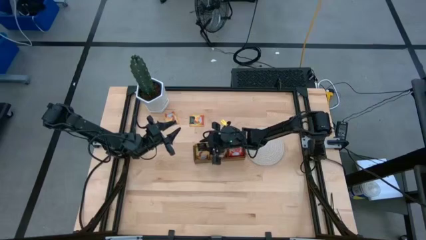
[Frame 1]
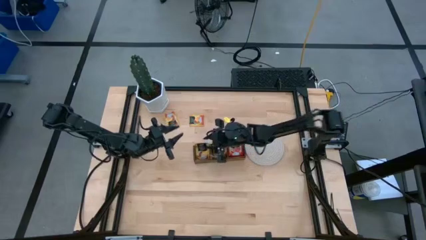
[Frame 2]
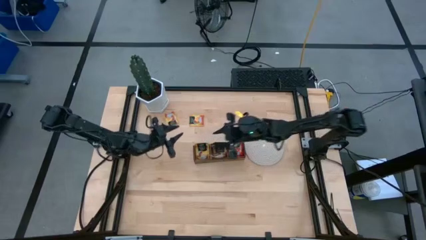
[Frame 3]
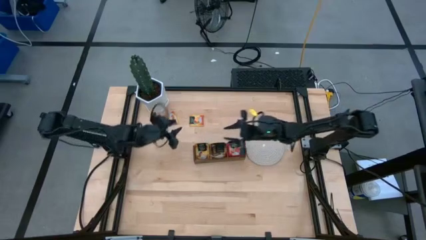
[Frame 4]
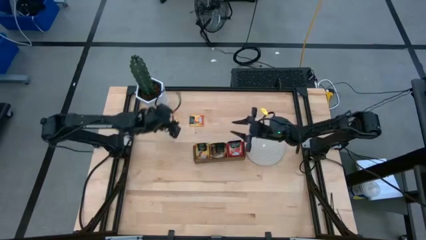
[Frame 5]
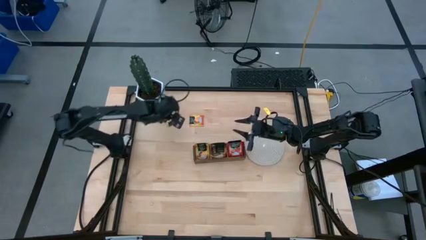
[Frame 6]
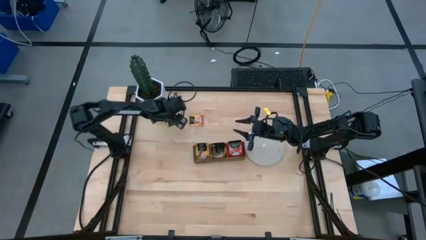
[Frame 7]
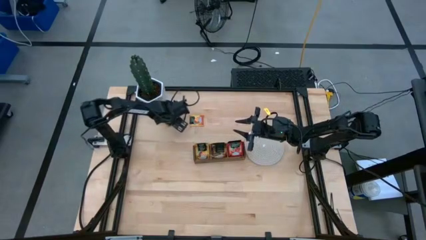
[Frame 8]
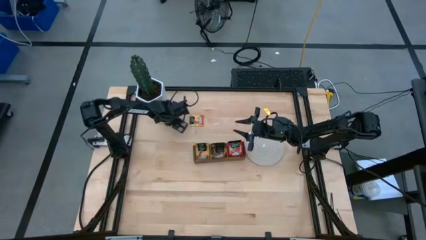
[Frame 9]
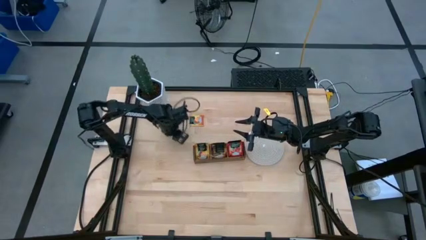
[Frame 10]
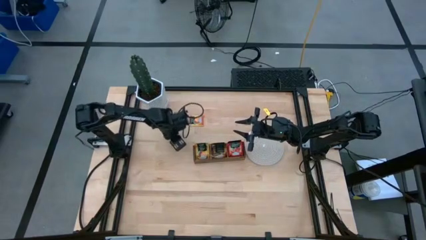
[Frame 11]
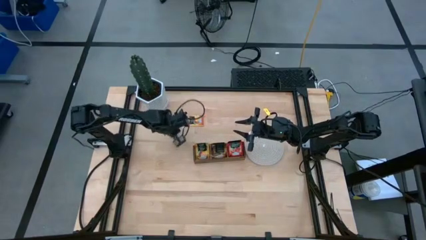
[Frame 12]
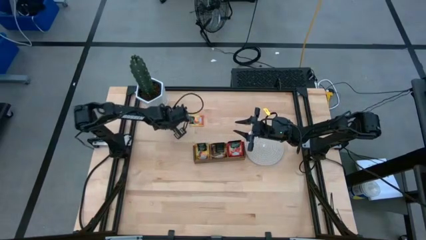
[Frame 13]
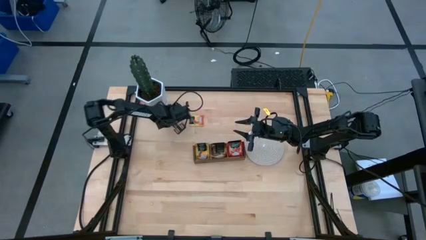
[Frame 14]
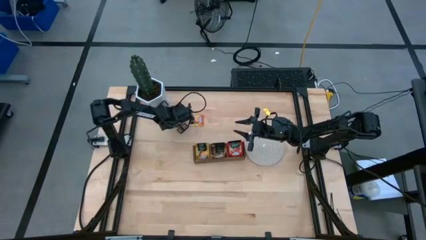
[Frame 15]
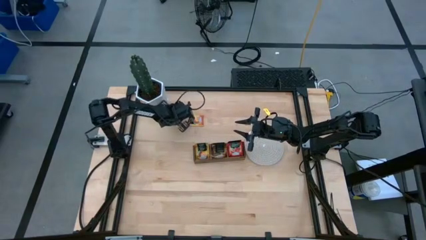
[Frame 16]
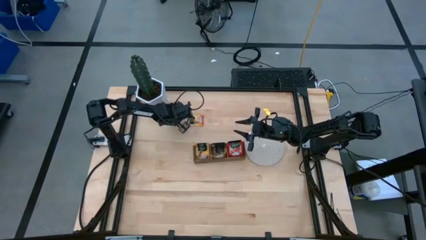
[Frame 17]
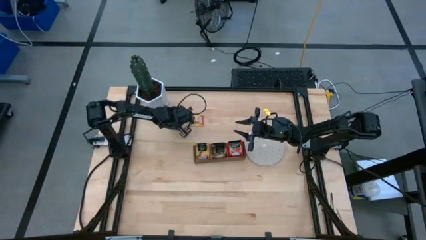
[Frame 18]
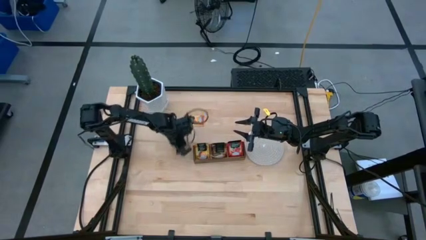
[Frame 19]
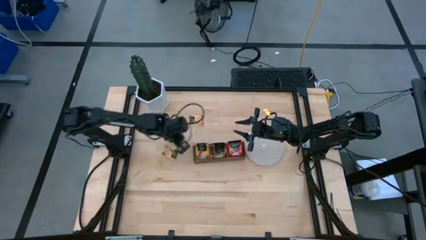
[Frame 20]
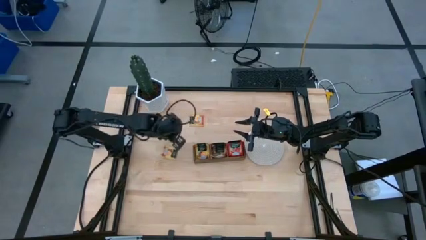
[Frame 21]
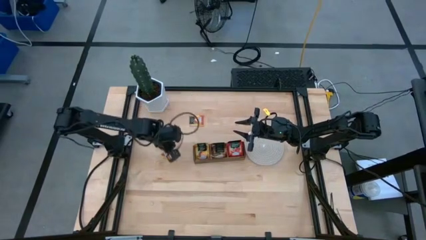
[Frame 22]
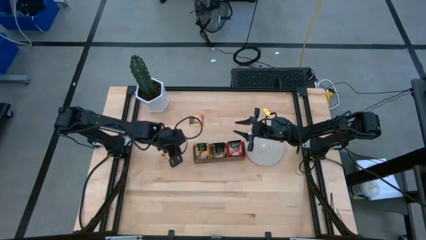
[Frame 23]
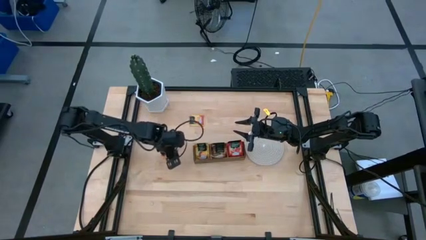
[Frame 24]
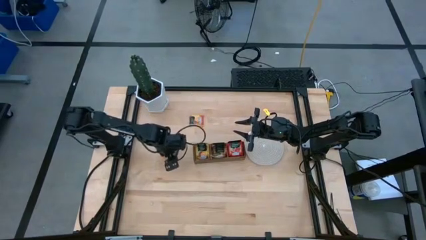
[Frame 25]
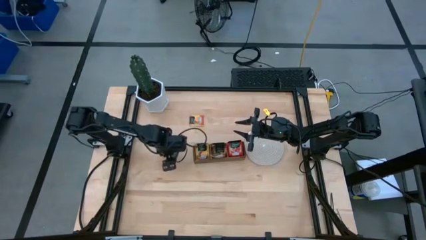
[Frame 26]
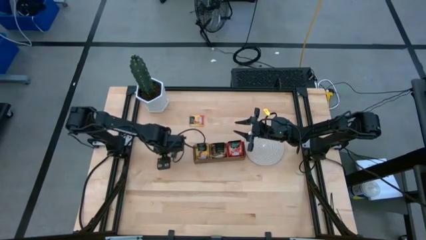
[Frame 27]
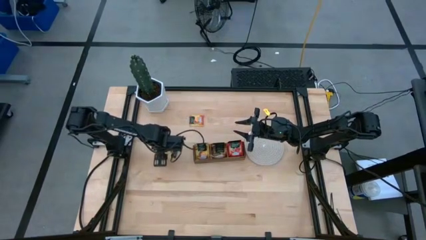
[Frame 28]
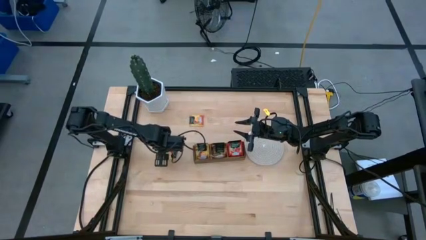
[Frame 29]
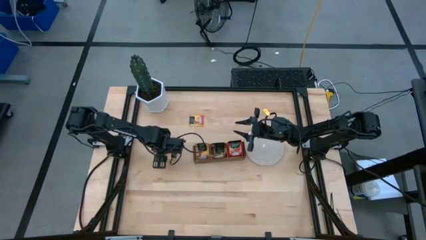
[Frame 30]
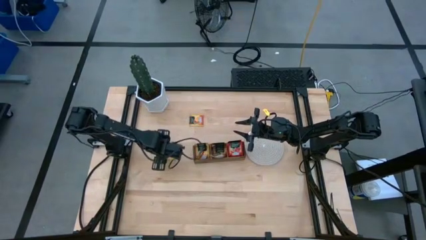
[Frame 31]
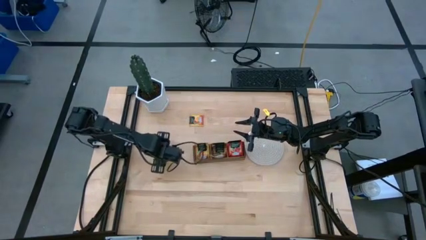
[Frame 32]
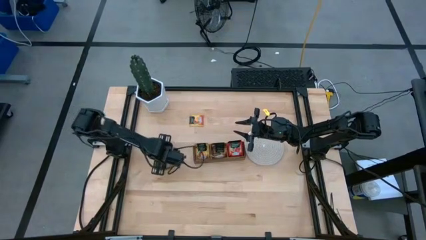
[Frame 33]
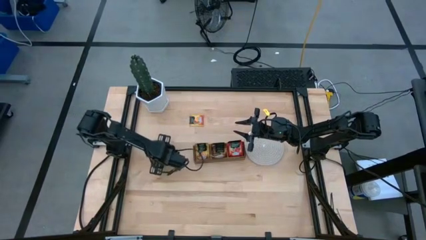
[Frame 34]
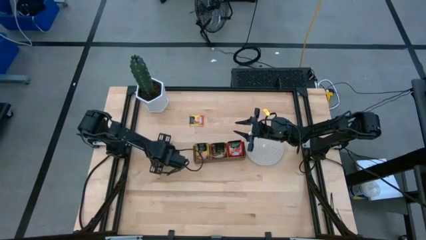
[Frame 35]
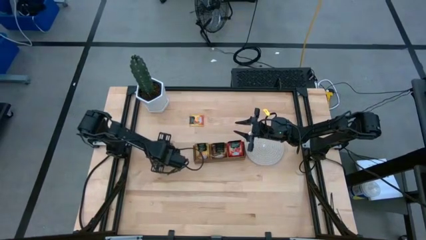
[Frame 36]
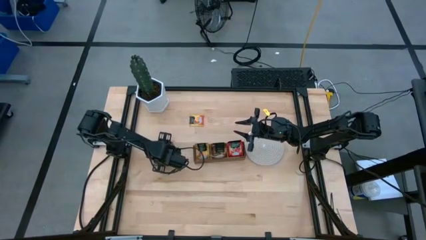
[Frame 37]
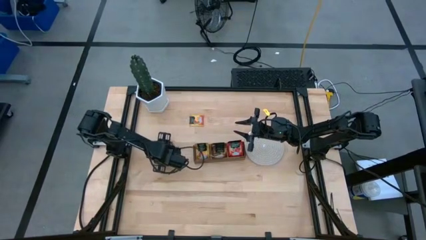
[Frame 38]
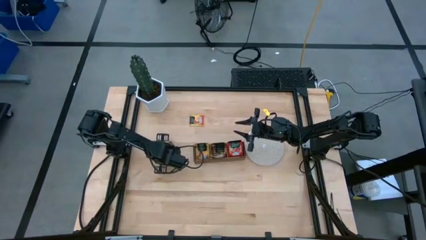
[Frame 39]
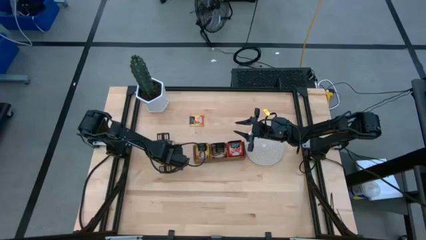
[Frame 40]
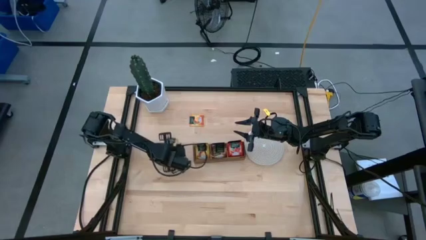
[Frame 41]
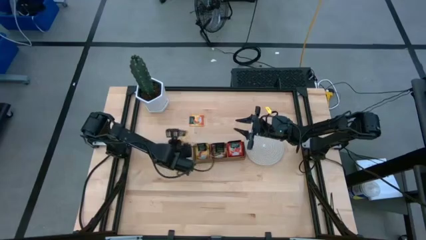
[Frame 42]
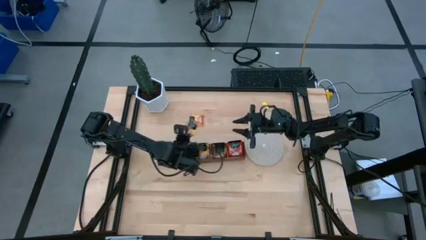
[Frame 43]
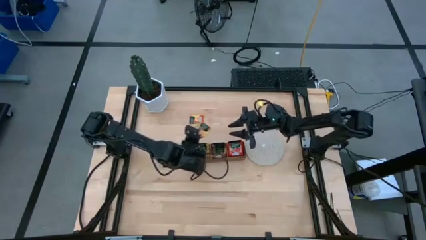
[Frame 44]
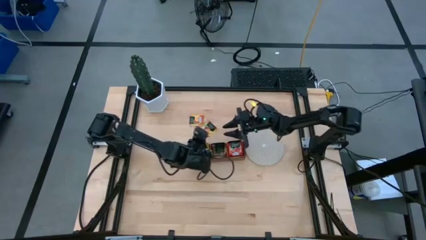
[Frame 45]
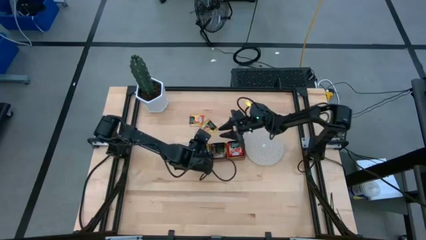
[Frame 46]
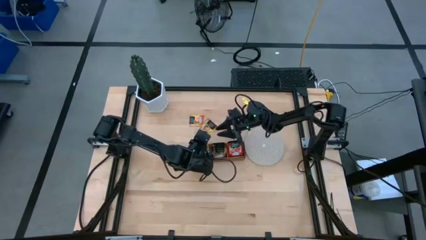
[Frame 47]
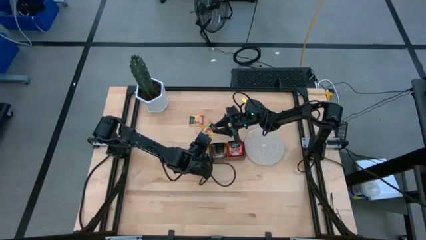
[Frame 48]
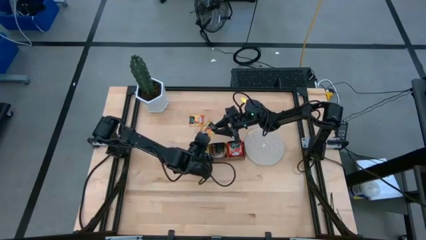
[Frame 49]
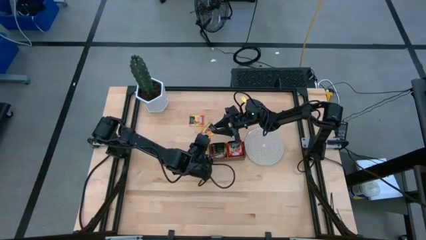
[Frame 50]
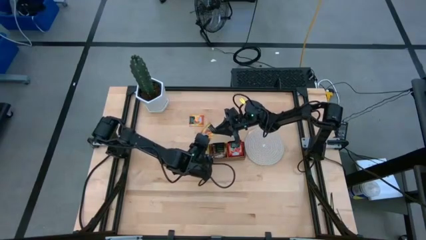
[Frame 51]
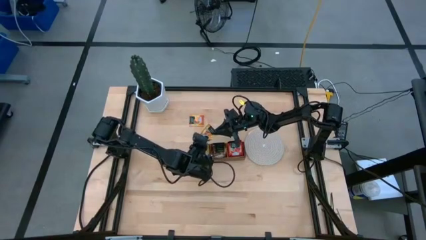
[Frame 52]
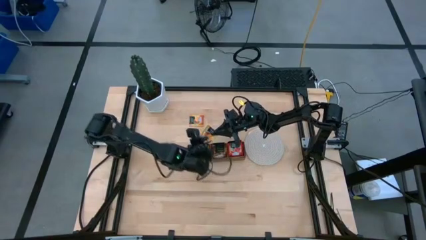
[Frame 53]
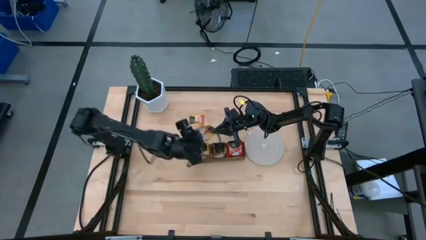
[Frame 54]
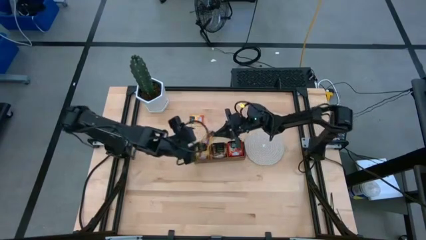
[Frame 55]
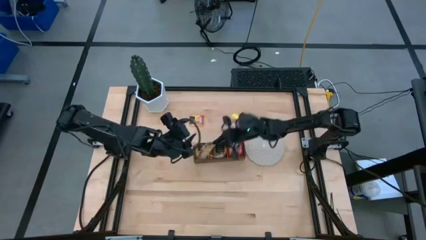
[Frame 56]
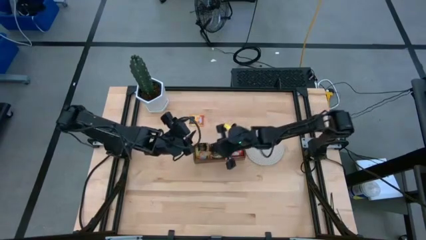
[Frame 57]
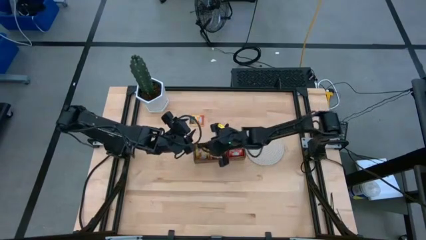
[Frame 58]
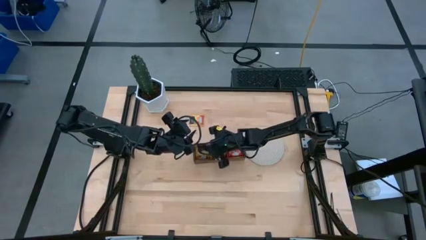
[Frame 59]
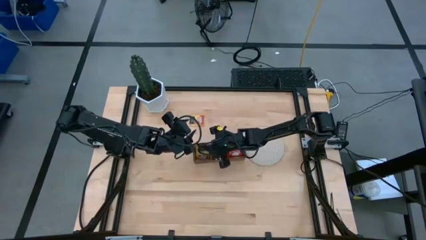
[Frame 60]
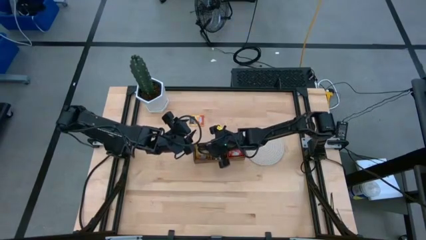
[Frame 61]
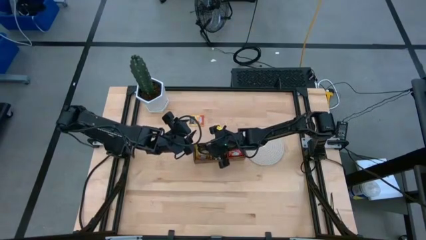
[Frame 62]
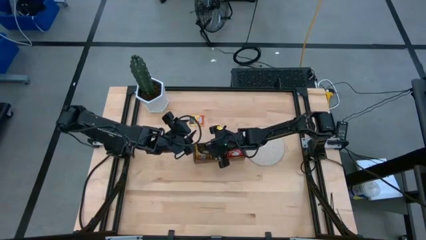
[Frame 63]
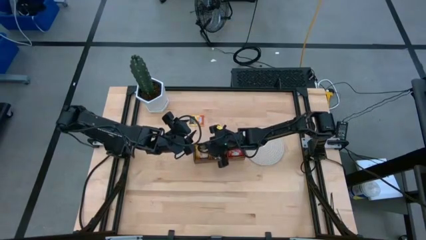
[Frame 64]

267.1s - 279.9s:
Task: Pick & Place Tea
Put the yellow tea bag into the left section of the wooden organizer

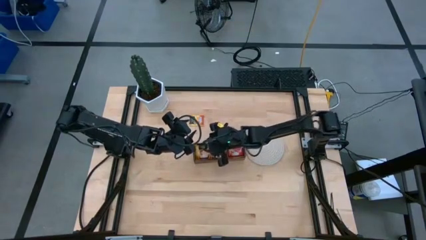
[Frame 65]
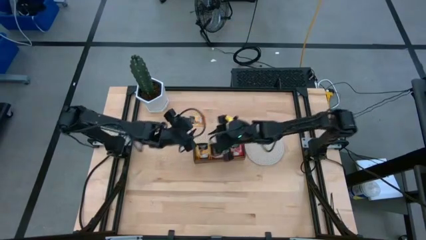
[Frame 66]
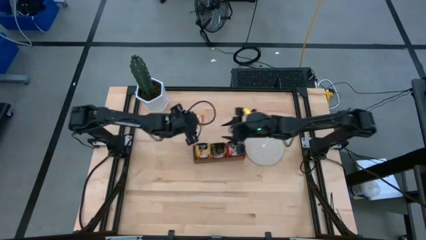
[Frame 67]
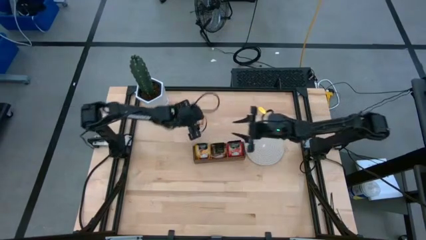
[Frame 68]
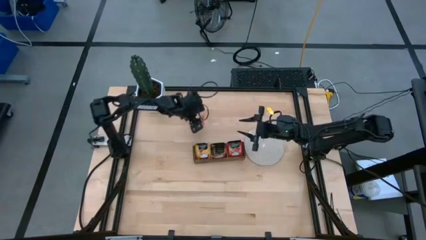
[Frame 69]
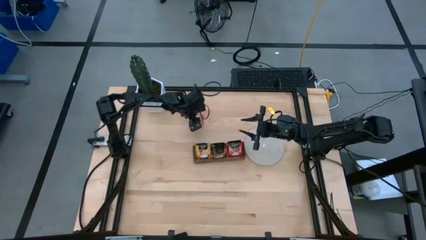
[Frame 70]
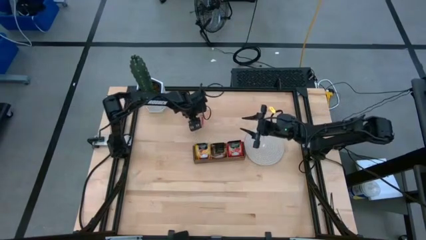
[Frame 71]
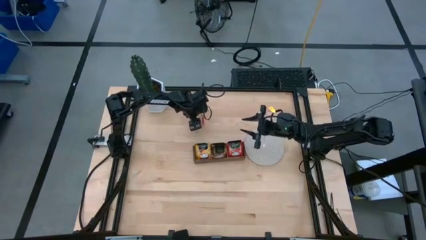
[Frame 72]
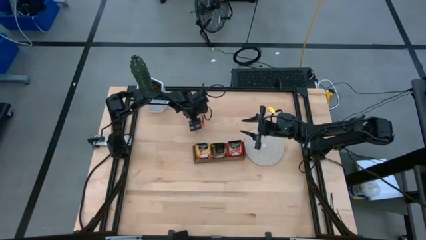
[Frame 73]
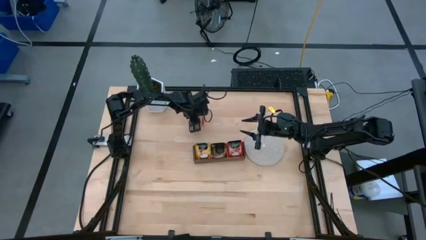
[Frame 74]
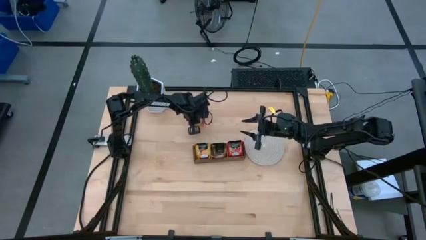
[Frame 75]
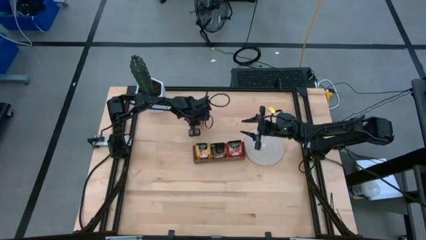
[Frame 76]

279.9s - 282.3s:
Put the yellow tea bag into the left section of the wooden organizer

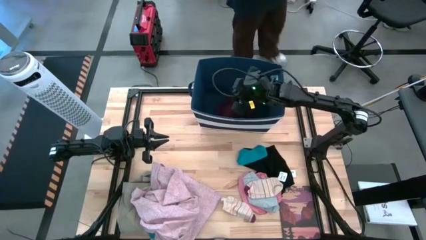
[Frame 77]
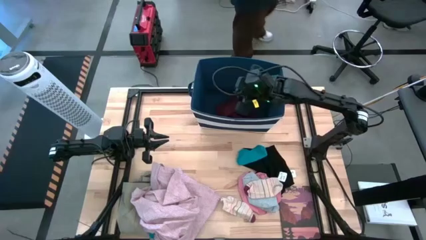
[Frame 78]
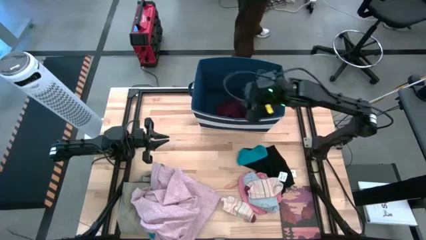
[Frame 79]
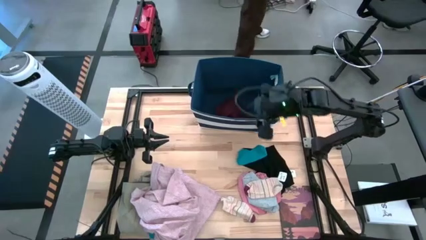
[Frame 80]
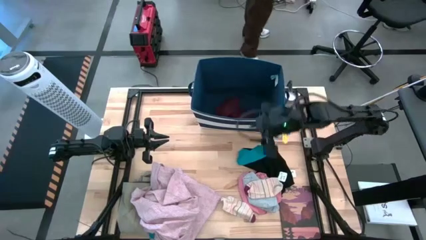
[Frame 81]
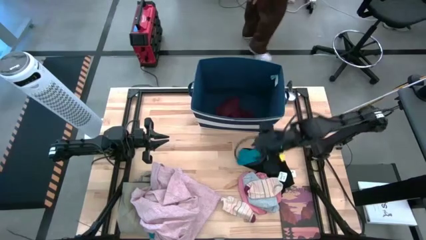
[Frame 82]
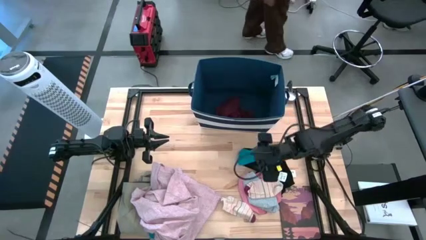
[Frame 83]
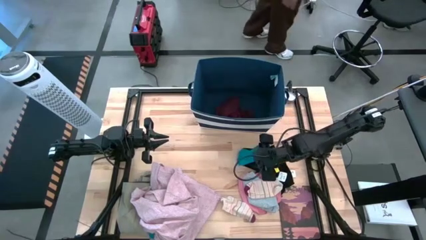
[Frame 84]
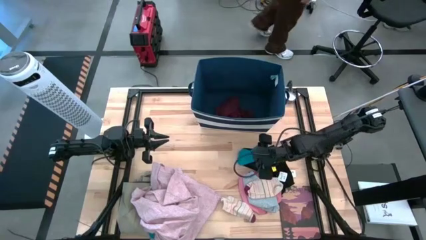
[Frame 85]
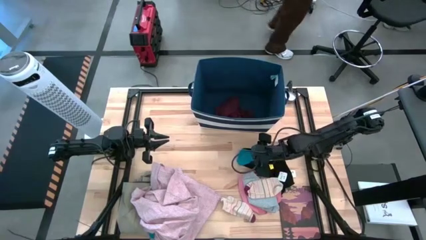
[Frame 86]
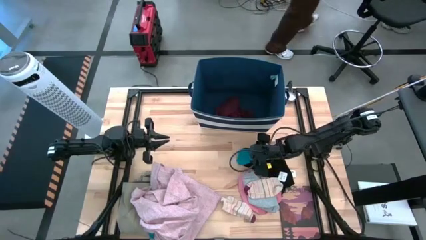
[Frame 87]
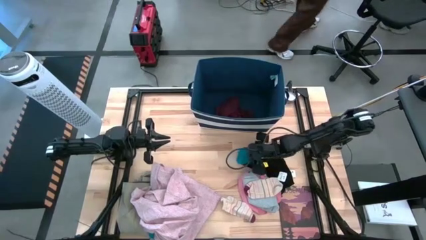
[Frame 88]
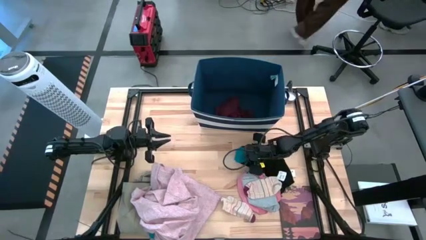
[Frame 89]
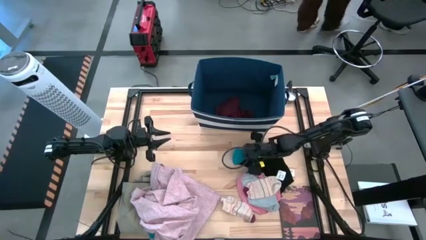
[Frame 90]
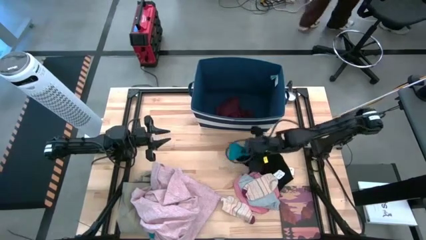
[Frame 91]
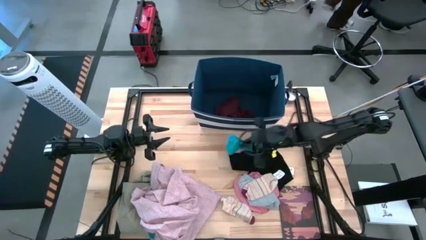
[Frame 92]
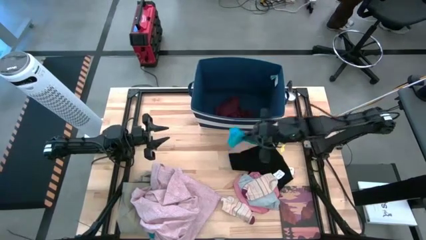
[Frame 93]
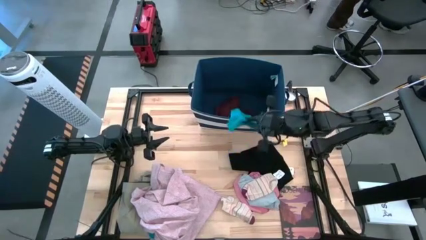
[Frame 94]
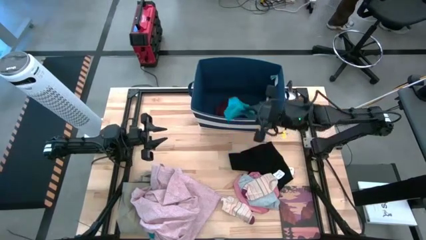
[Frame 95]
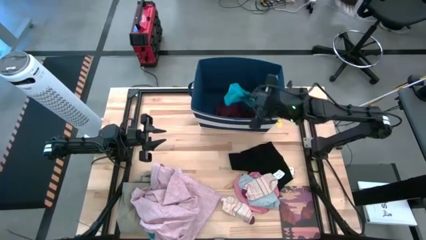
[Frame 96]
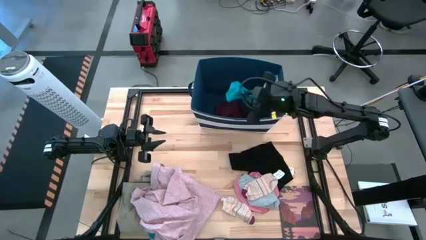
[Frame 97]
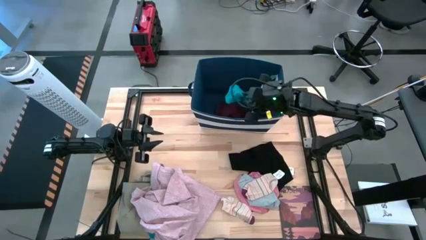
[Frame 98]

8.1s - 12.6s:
Task: Sort clothes
Put the right blue sock into the blue laundry bin
